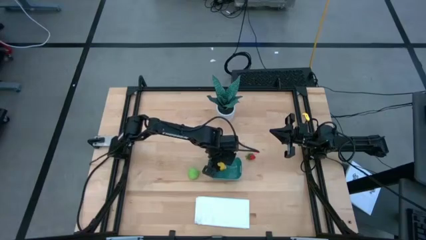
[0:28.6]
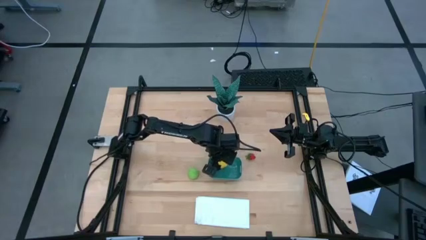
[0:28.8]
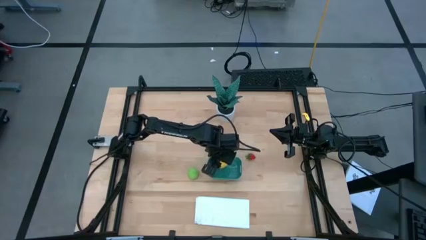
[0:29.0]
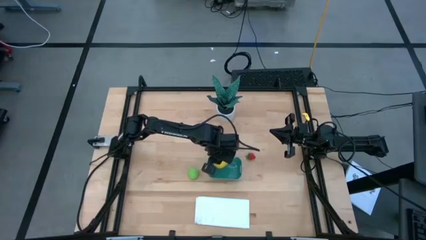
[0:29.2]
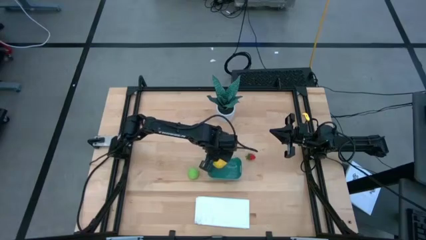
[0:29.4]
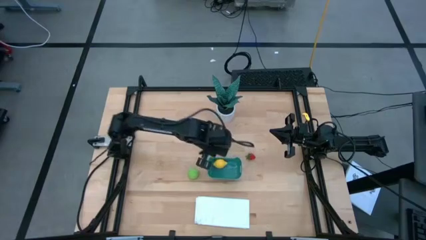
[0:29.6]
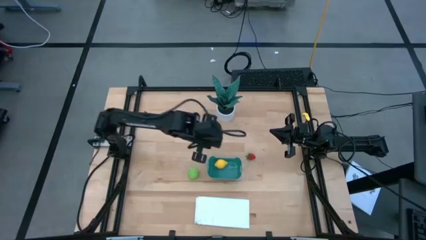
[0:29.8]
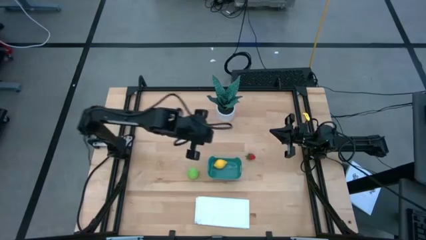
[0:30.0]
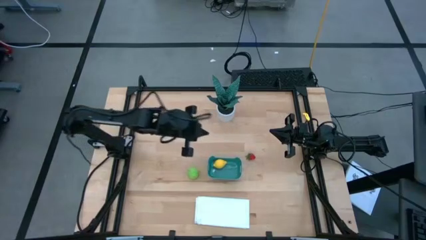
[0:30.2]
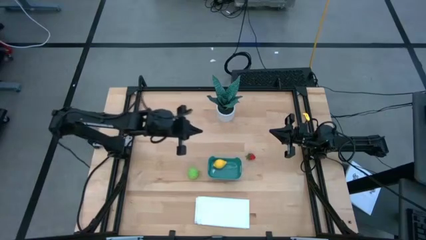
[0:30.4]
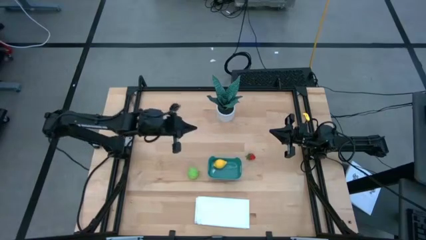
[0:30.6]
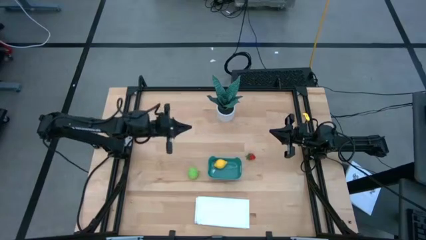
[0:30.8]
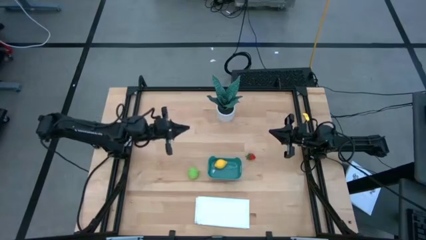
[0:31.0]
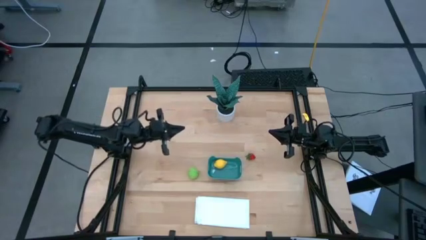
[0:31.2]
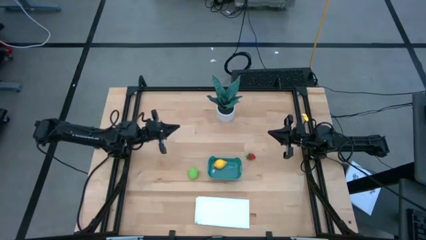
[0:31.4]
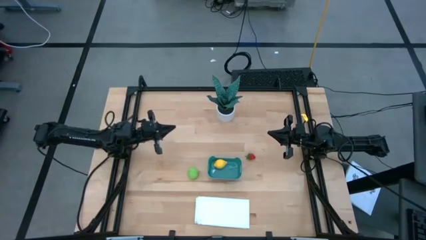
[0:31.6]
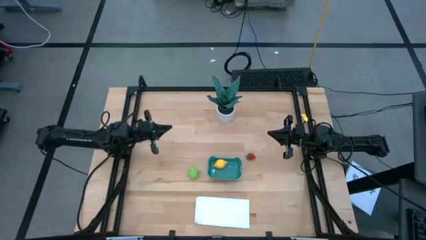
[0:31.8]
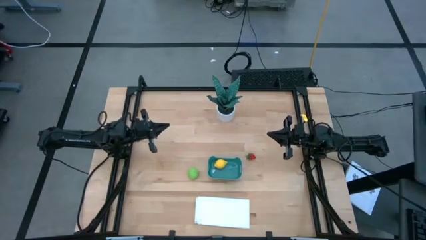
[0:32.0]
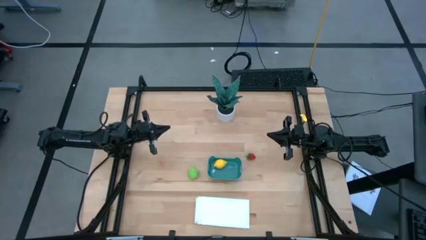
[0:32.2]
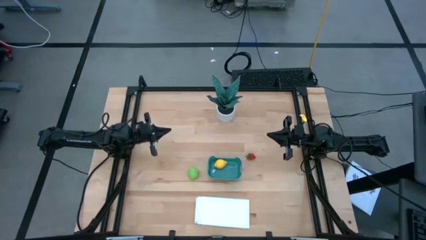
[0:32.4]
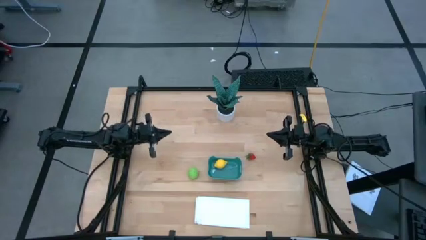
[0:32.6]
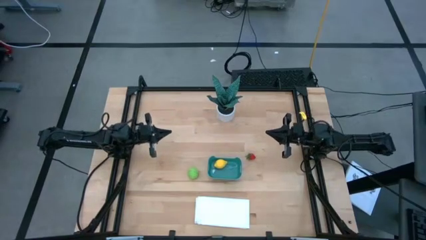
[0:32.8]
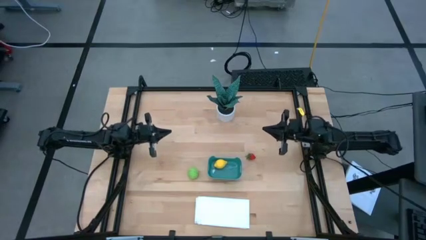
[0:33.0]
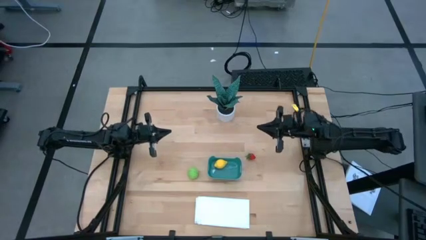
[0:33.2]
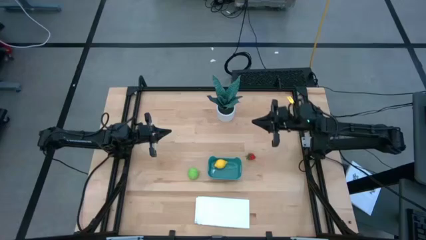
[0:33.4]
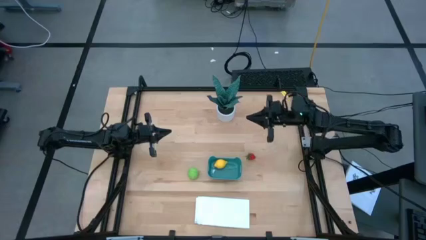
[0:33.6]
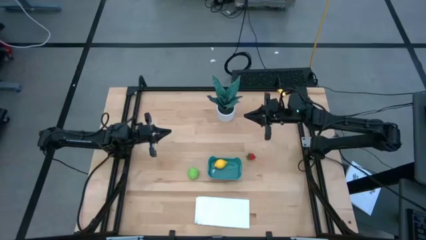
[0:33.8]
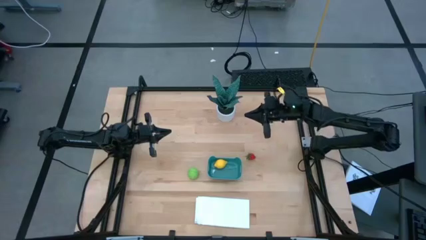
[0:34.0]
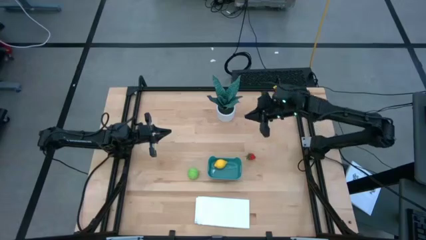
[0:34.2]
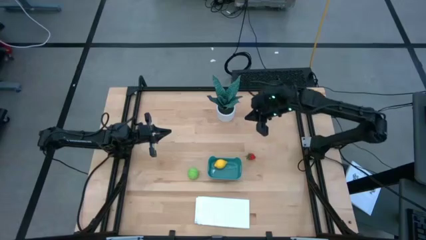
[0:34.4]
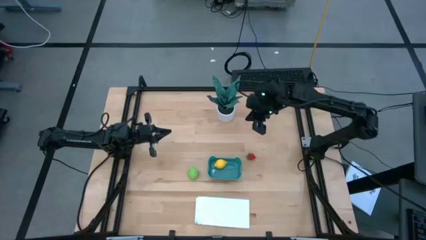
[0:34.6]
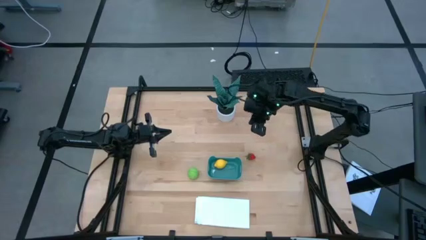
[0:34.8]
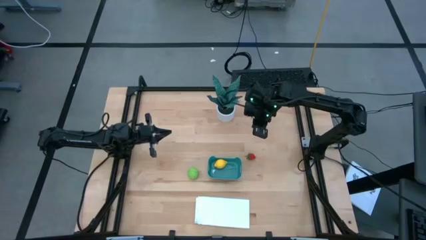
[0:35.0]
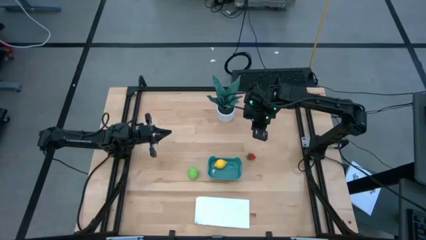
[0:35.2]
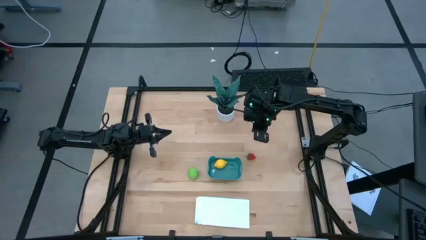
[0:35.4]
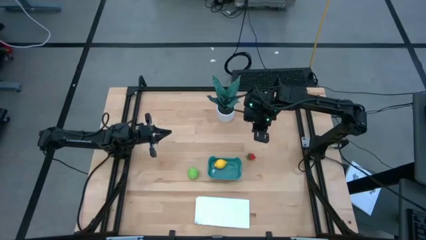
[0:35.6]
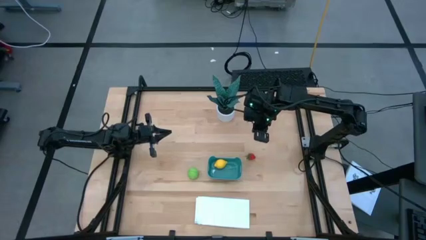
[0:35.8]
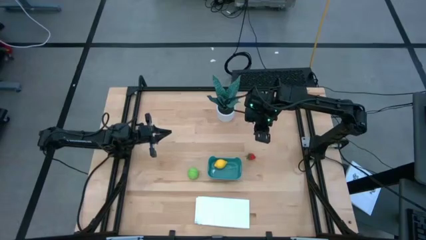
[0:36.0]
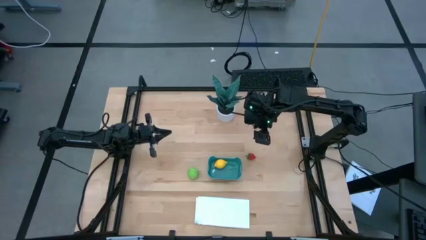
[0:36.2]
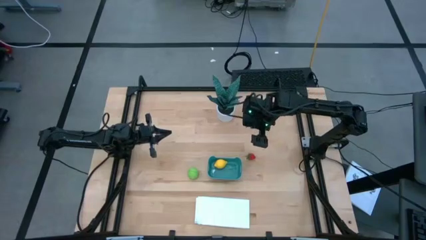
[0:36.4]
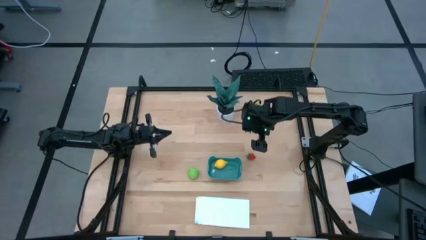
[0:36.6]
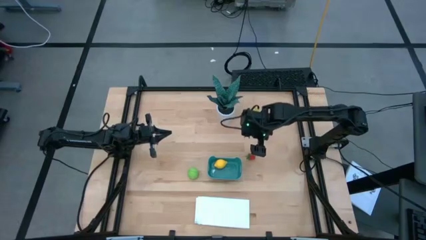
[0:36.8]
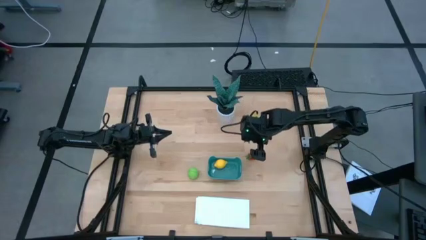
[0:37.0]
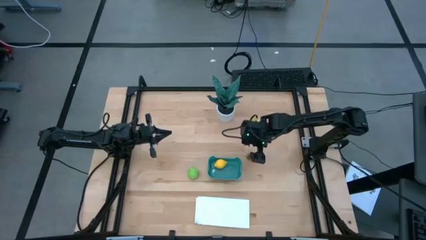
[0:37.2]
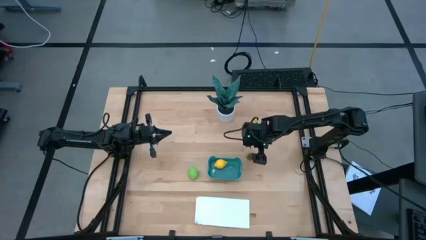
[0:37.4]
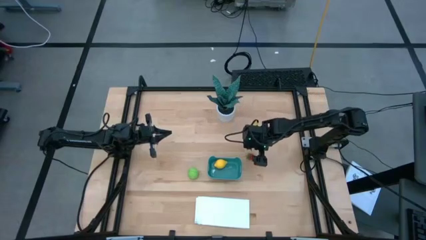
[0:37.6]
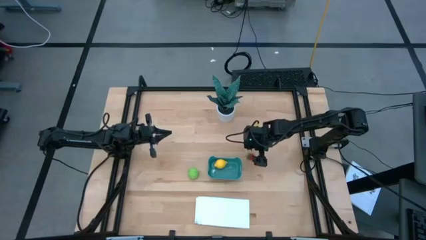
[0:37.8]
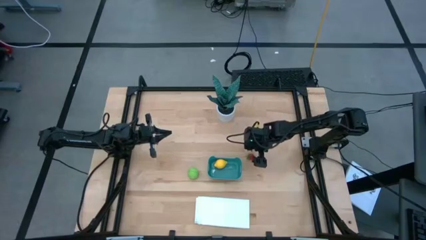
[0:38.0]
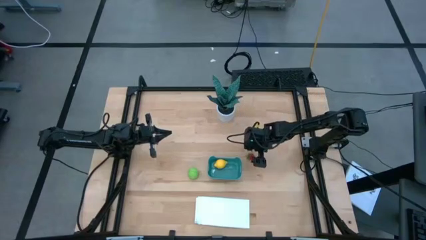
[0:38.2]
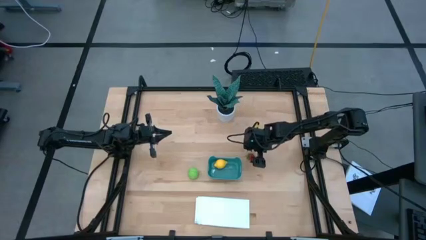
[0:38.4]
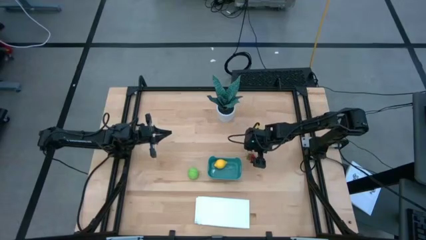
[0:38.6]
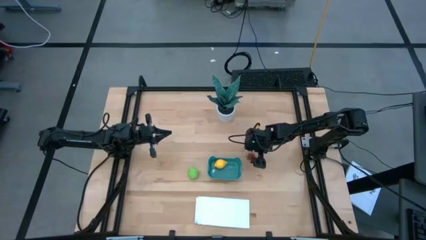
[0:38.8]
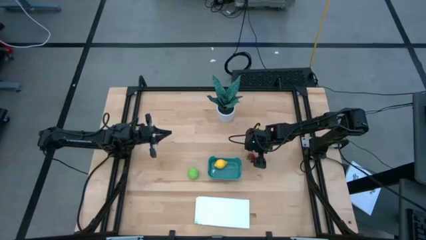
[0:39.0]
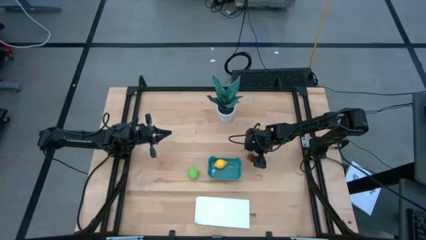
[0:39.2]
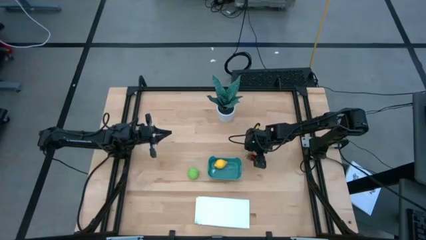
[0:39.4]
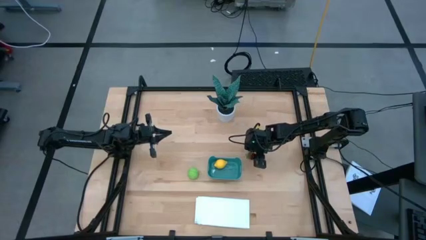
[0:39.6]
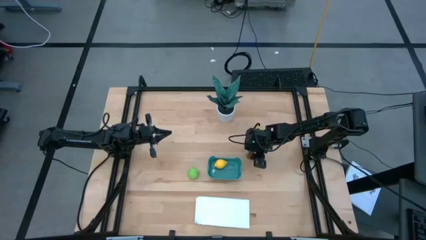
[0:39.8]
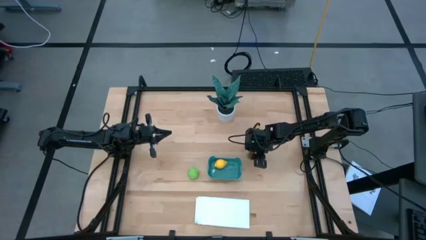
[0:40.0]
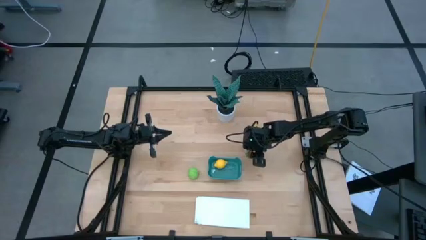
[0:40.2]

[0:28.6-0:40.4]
Task: Pick and placing Produce into tupperware
Put the red strawberry into the green bin

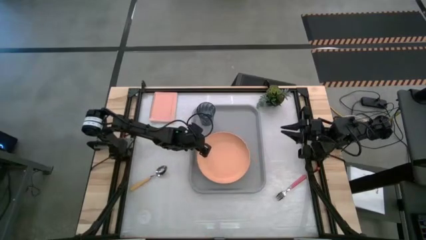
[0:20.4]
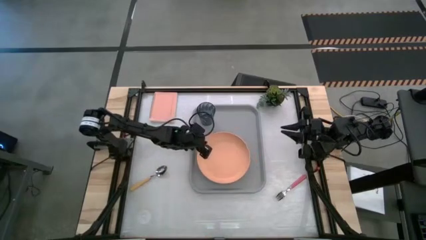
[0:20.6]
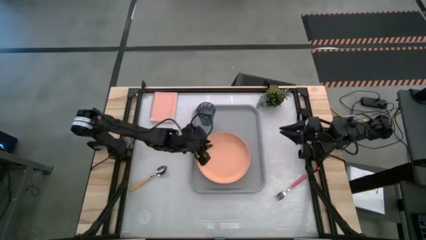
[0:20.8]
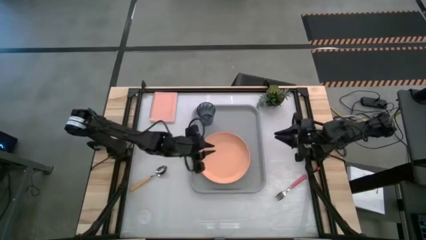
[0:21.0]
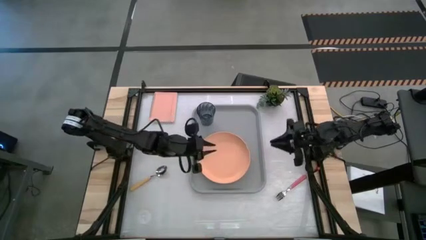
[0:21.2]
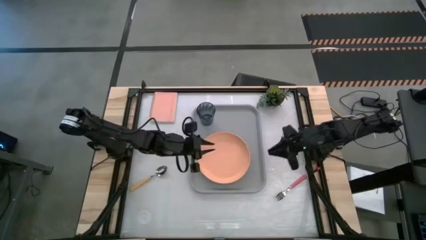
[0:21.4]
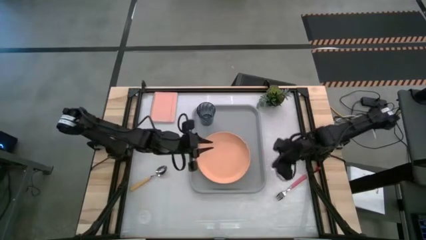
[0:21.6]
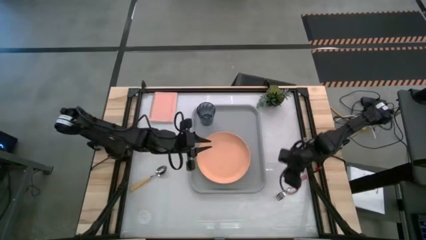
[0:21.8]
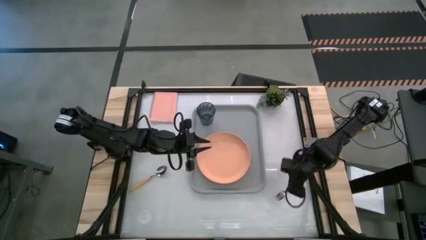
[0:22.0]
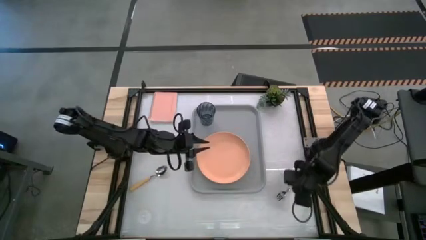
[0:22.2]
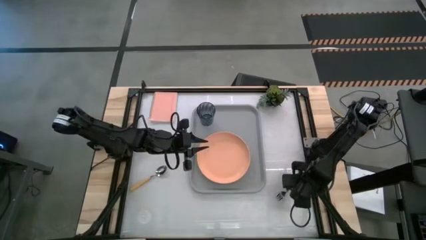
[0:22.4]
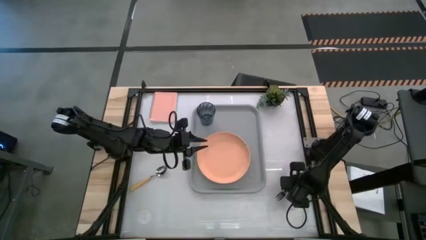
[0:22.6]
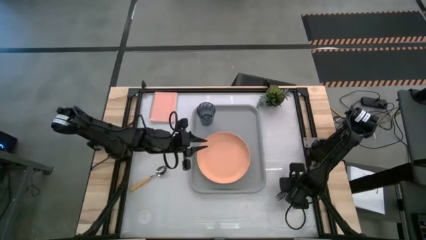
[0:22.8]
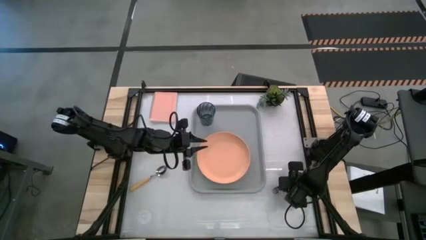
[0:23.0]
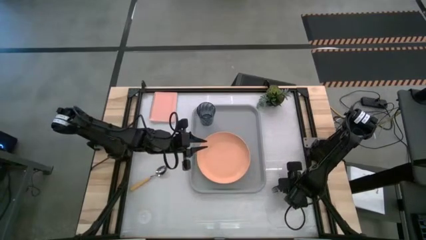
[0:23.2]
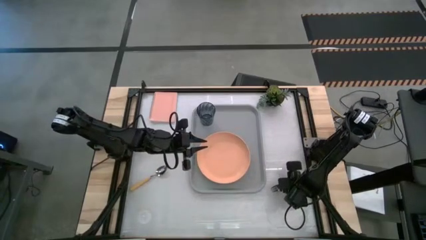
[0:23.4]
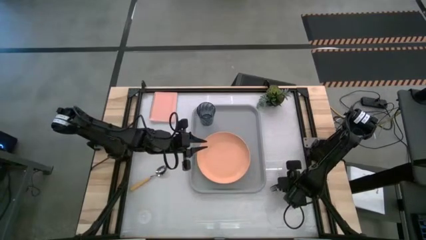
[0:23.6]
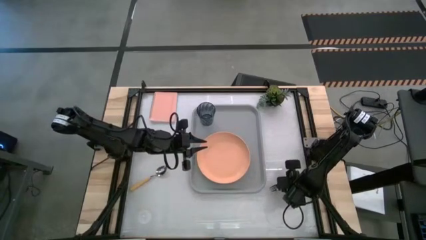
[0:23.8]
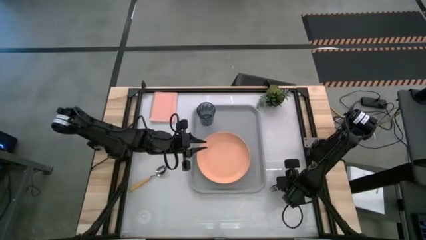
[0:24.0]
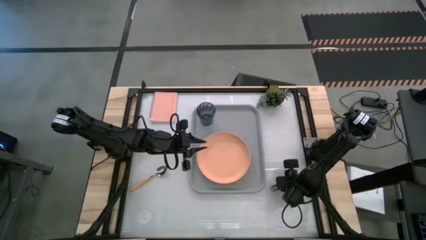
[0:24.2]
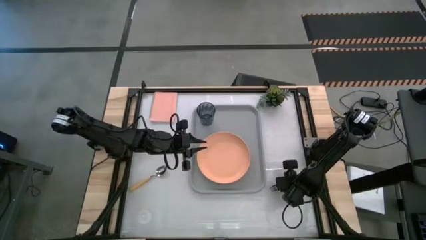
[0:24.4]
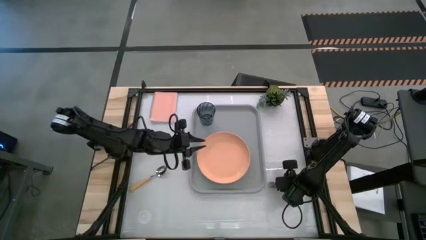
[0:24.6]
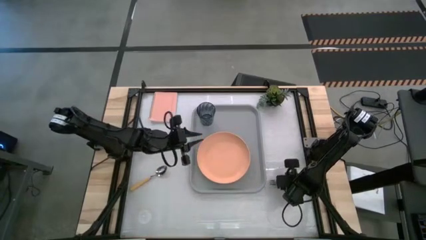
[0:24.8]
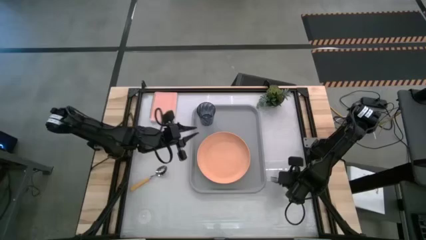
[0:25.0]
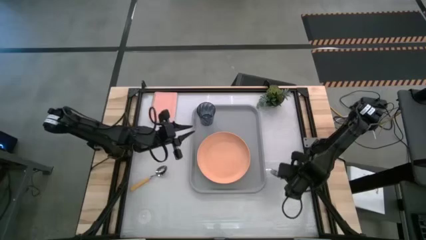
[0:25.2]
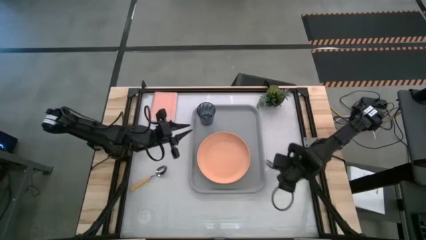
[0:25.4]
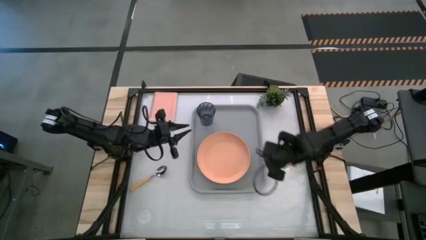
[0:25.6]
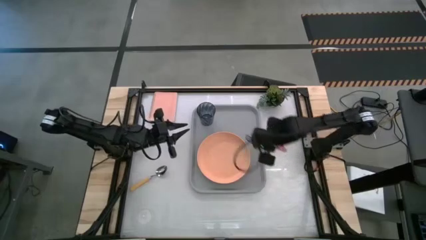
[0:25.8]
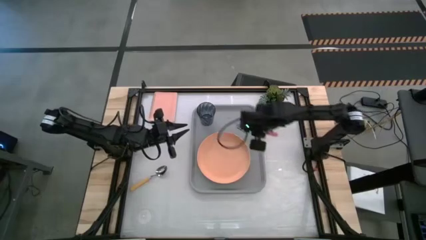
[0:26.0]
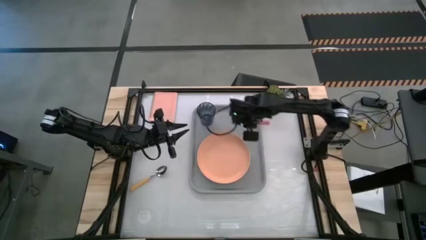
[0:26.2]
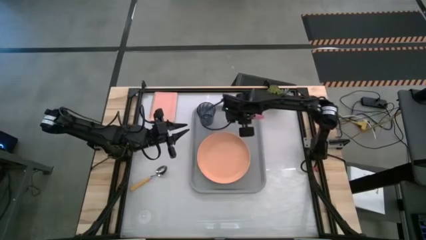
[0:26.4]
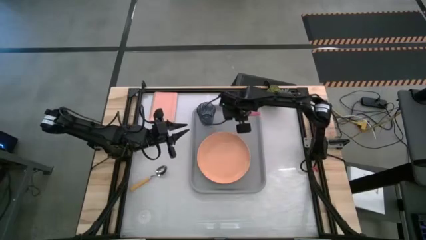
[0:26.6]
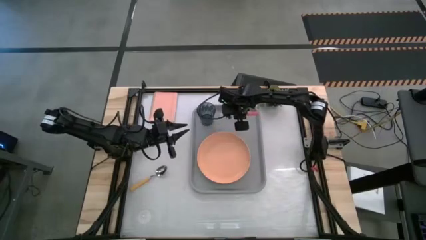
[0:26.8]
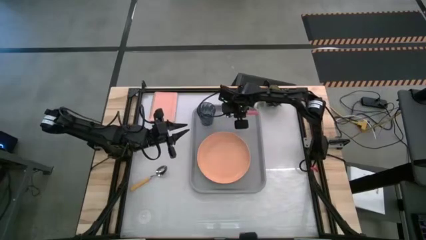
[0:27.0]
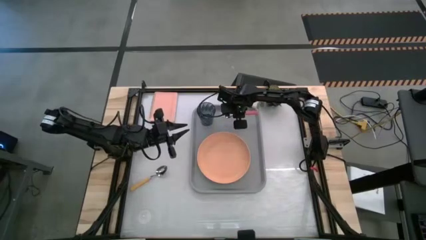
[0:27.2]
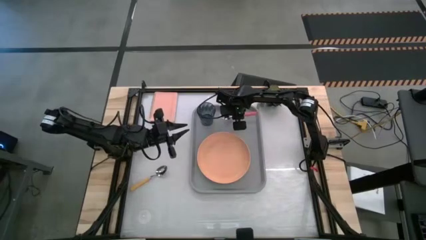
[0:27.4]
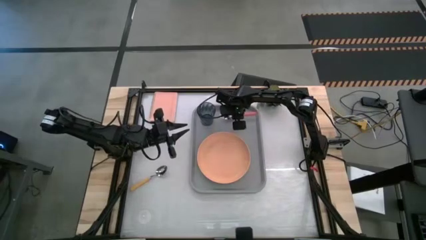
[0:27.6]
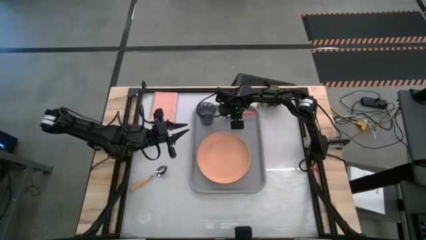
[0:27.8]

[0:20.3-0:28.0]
Task: Pick and place plate/cup/fork/spoon on tray
Put the pink fork on the gray tray to the right of the black cup
